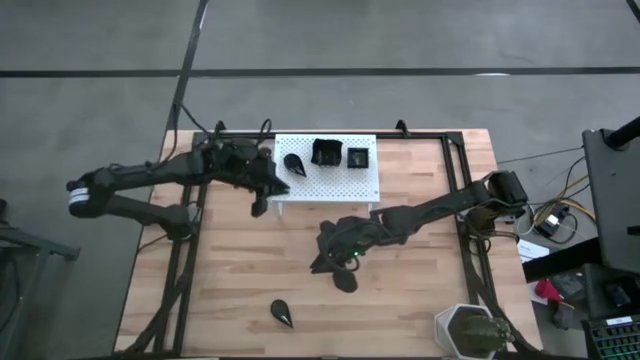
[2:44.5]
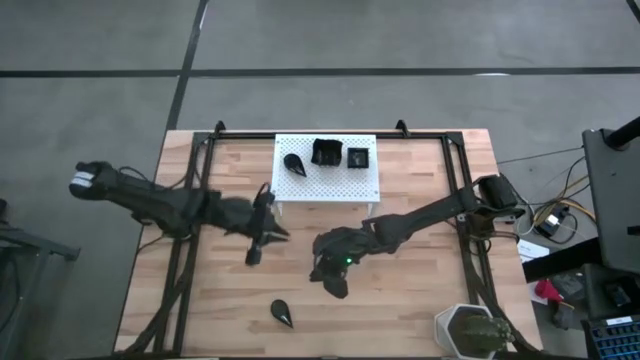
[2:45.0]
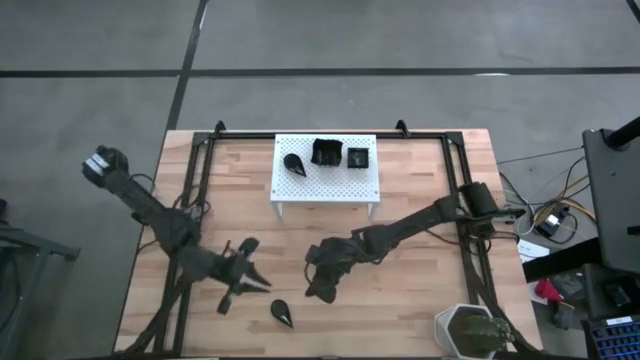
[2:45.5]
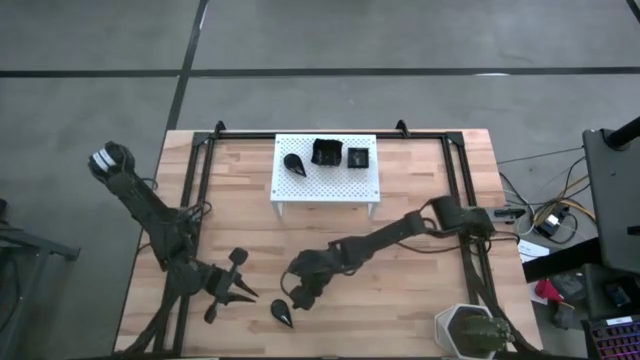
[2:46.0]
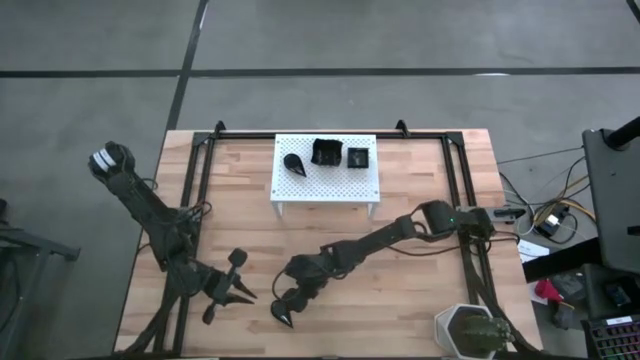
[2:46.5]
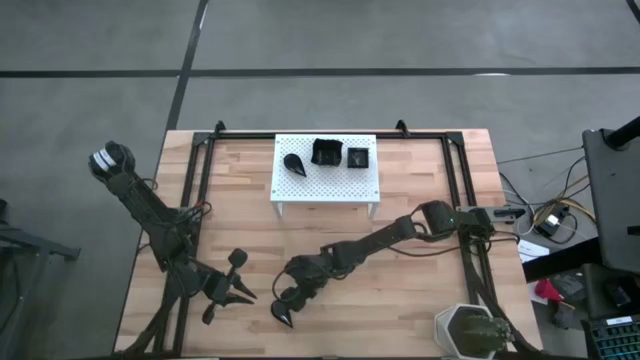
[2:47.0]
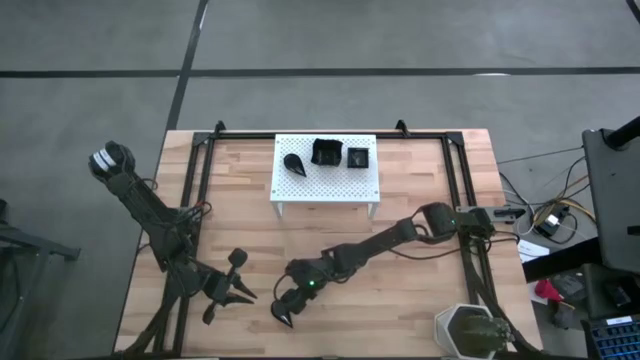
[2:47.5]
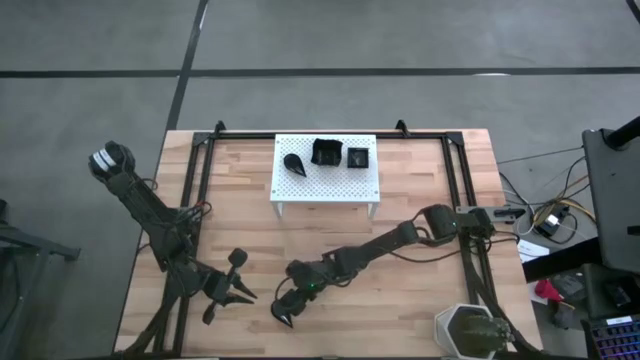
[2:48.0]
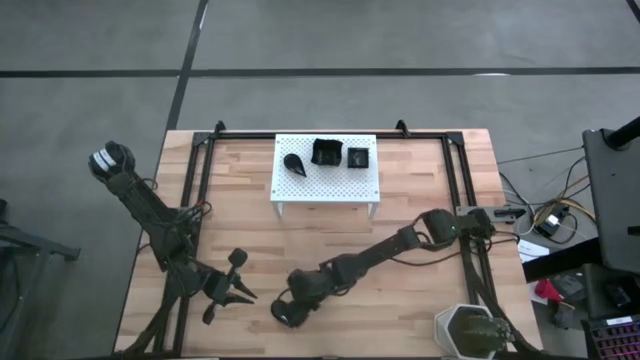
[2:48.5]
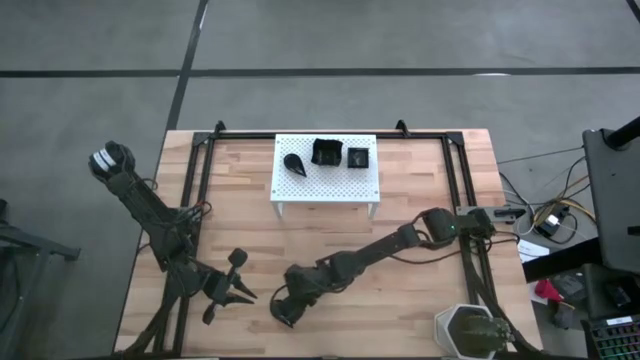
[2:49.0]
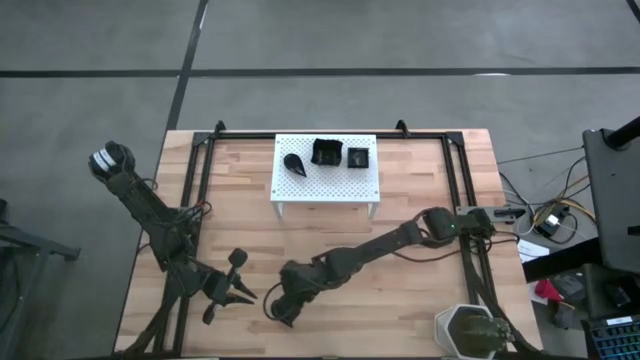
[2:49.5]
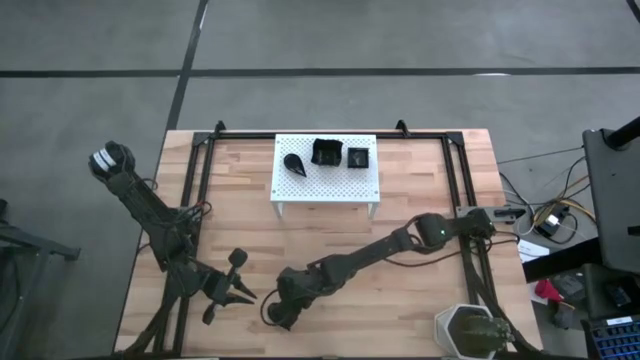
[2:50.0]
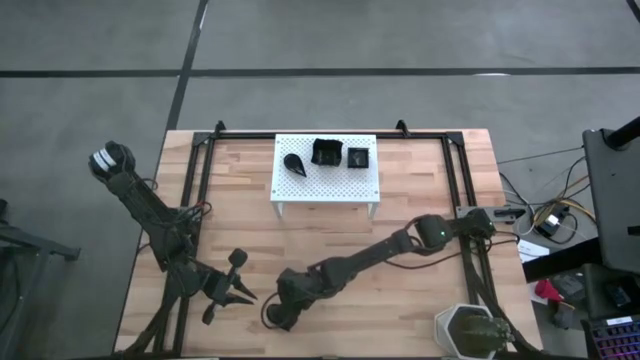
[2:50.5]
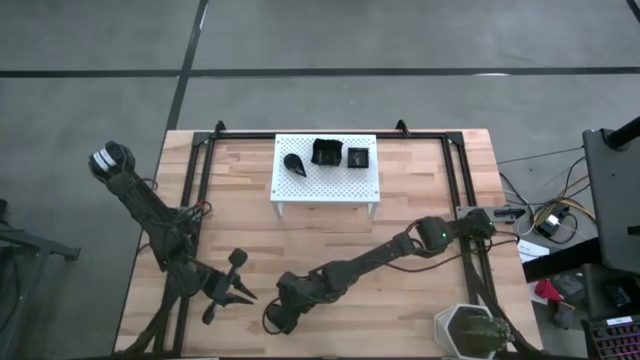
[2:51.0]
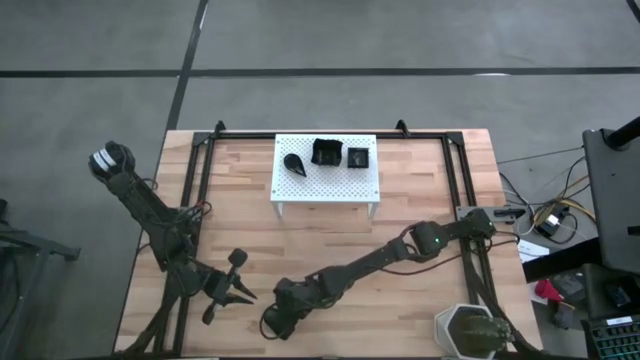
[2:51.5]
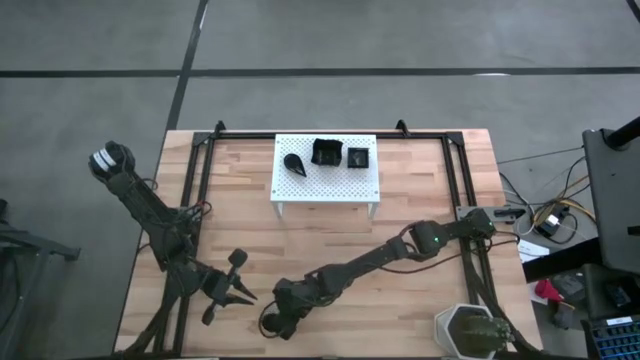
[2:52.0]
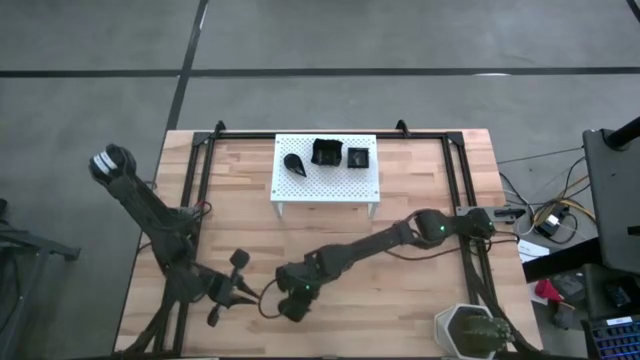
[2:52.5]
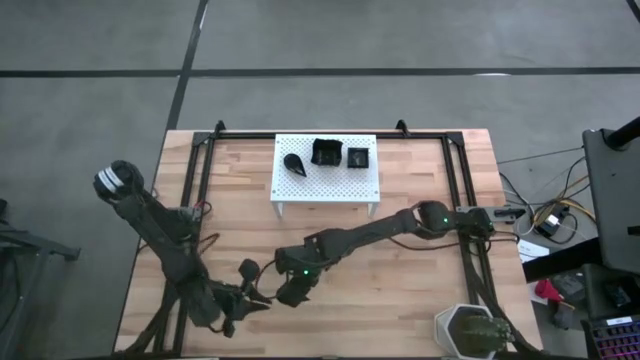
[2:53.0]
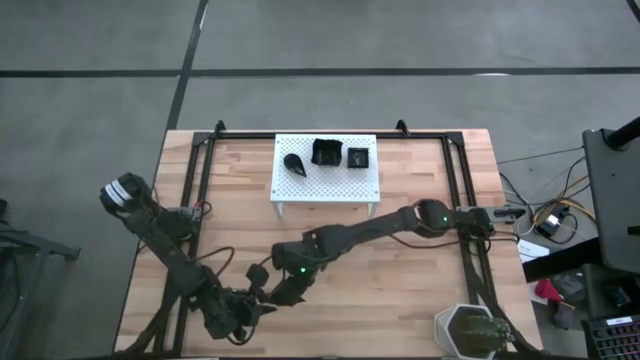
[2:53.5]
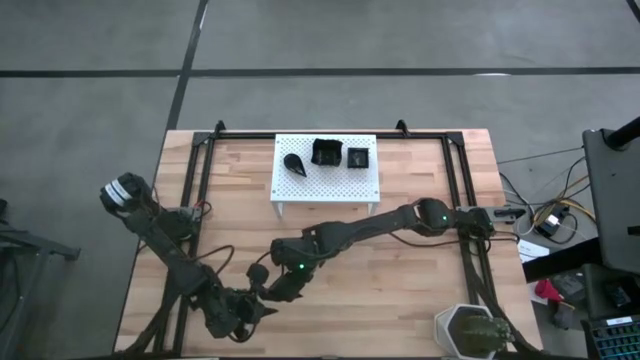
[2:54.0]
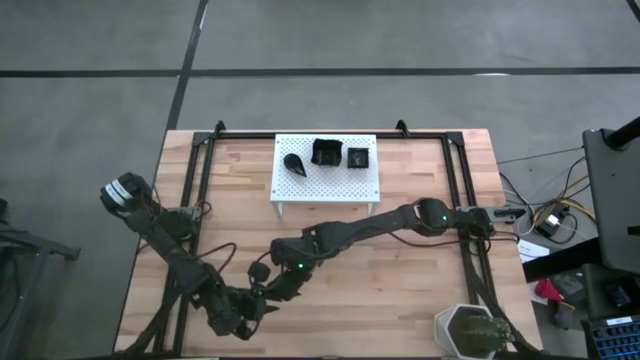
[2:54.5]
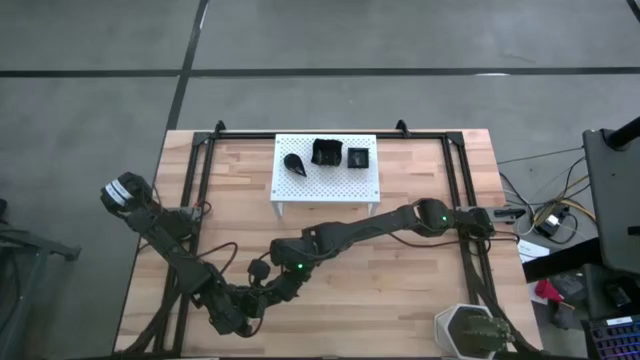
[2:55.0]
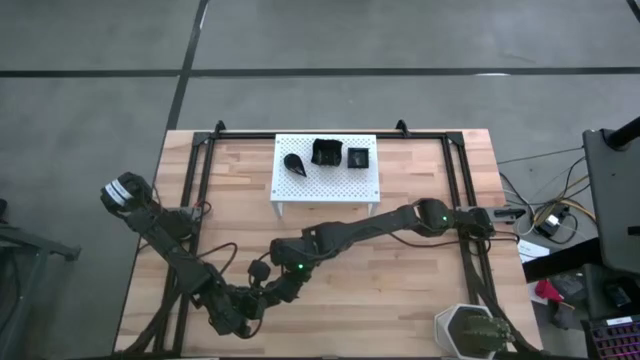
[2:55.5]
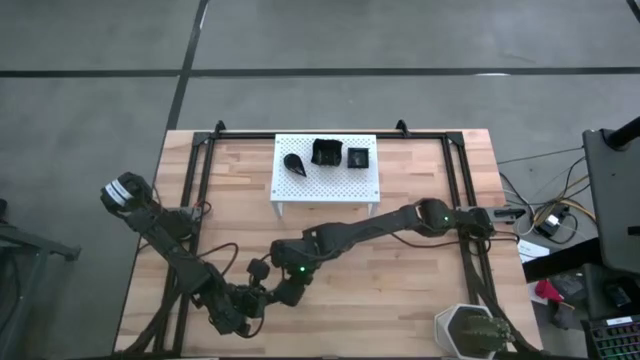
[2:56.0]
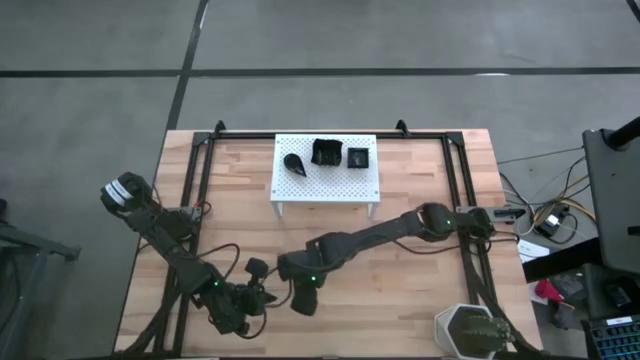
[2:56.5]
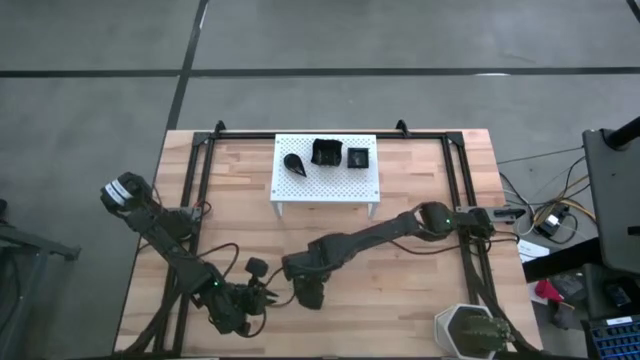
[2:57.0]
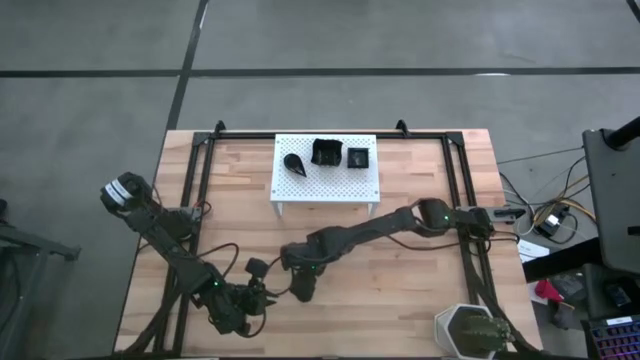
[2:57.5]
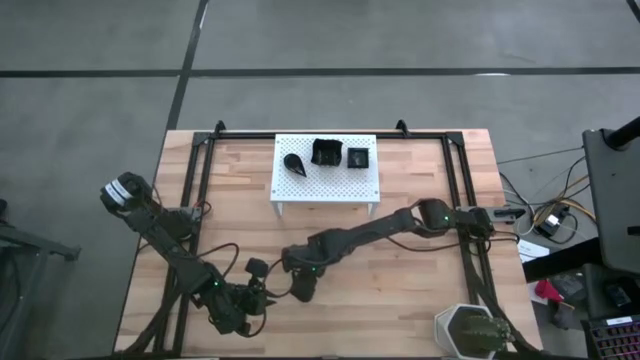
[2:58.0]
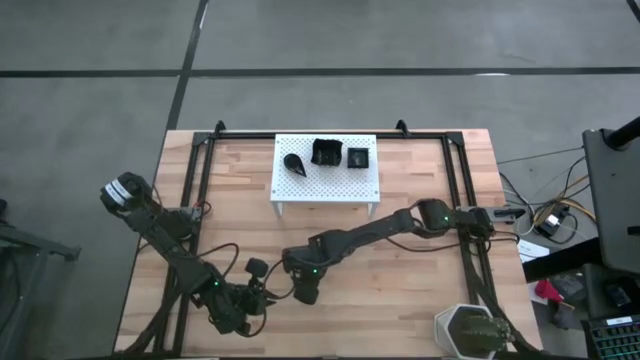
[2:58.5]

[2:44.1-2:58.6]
Task: Pick & Place Mini shaped plates
Stack the drop shaped plate on top of the drop shaped plate on the shelf

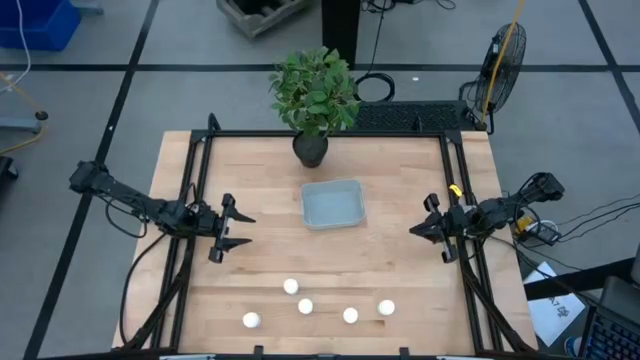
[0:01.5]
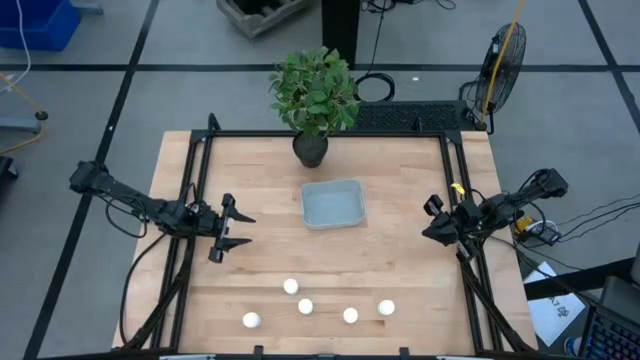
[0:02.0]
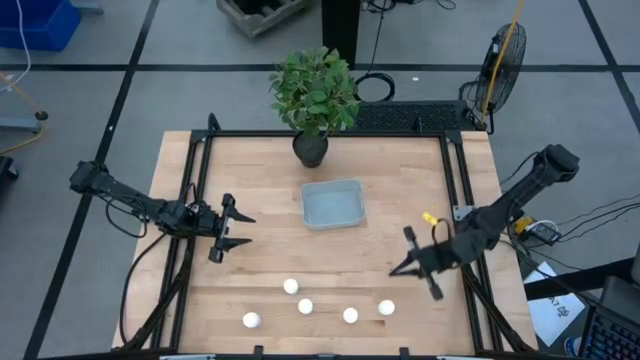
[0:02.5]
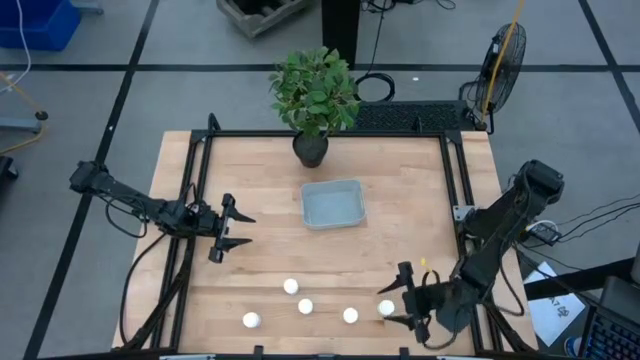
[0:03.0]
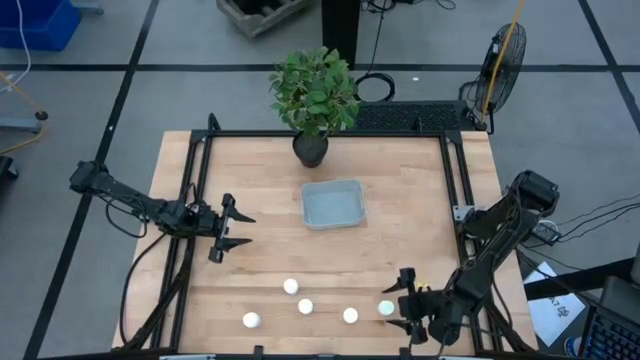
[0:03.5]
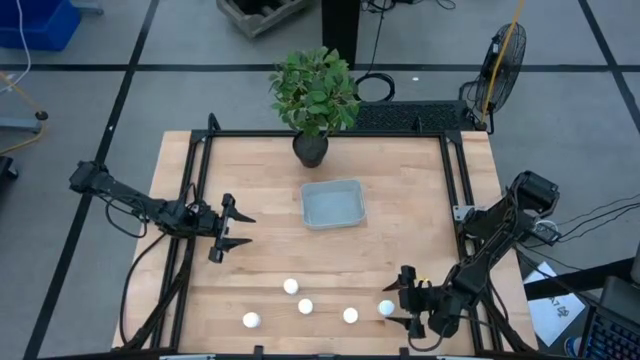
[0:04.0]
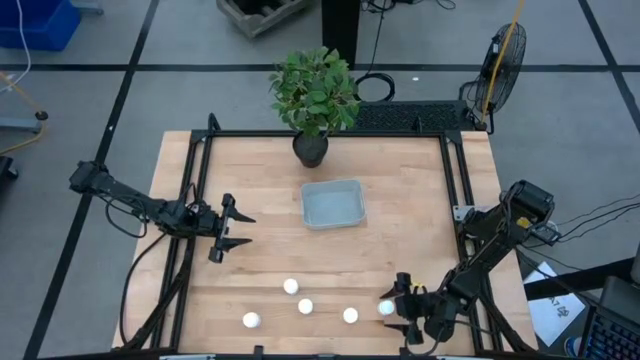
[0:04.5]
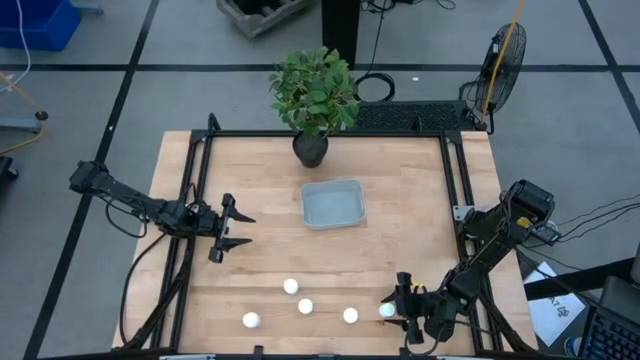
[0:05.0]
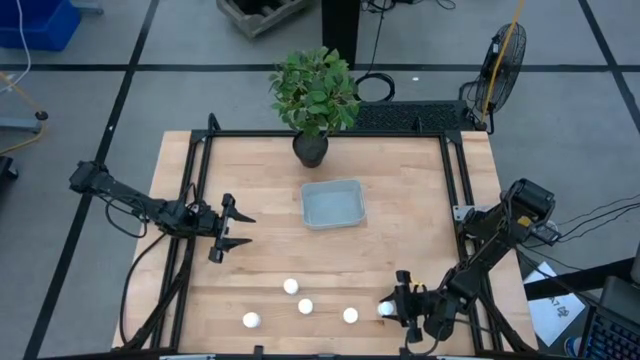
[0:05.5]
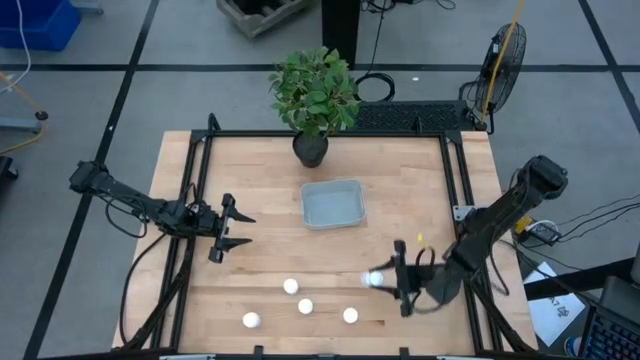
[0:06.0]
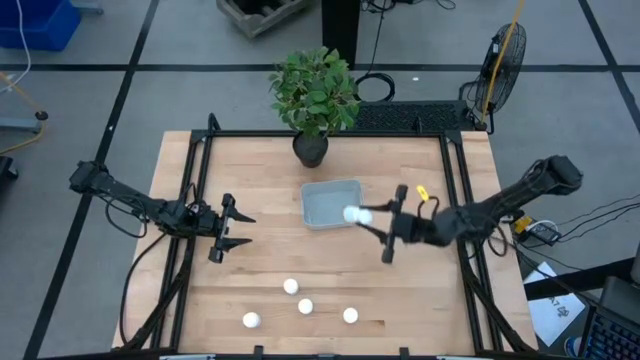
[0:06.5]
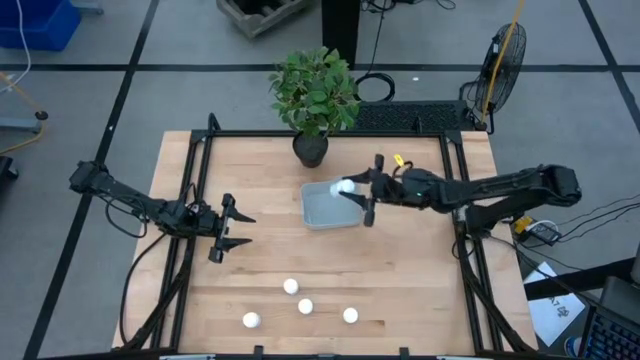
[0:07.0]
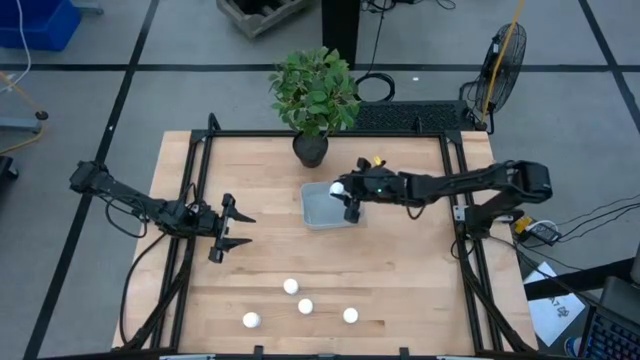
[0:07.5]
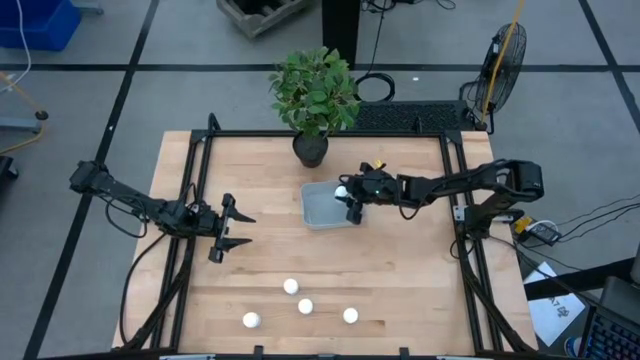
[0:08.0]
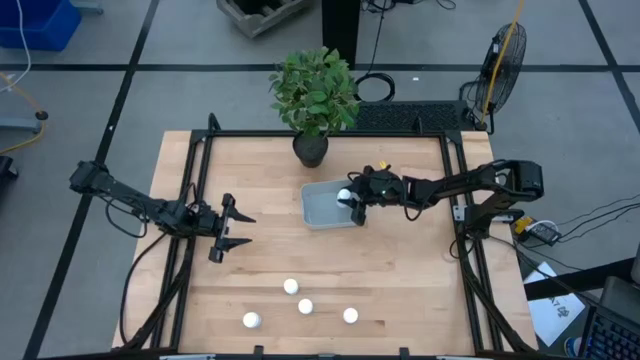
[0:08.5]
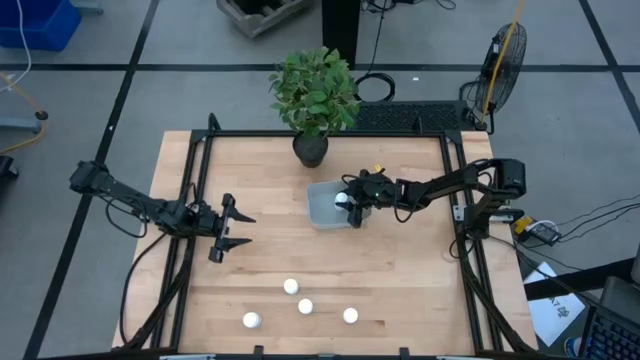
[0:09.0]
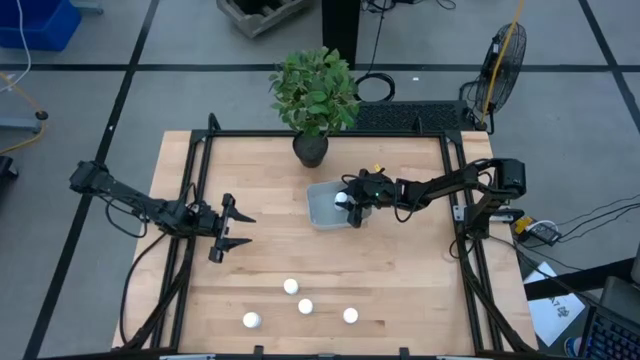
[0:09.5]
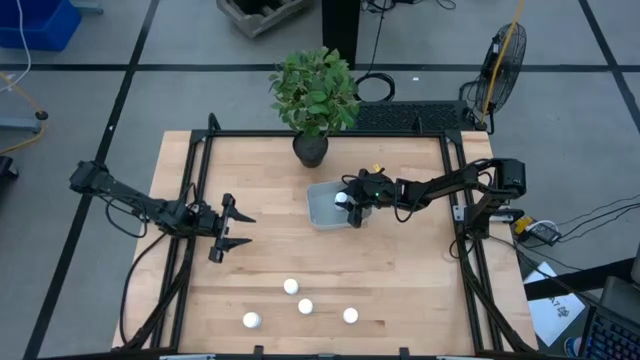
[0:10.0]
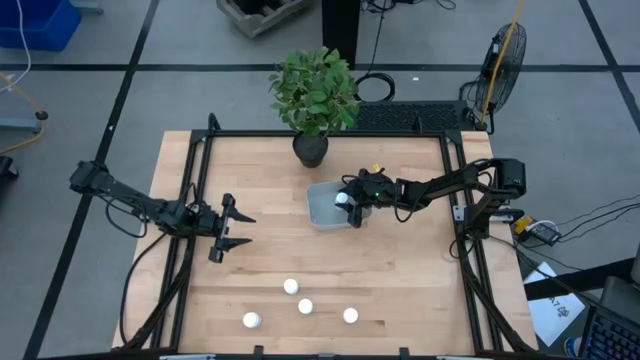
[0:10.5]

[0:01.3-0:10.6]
Task: Pick and place pill bottles into a basket
Put the white pill bottle into the gray bin
